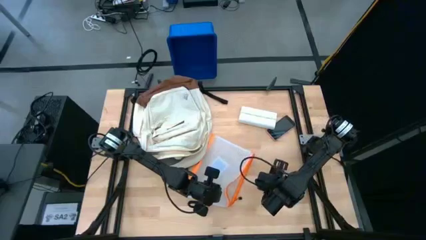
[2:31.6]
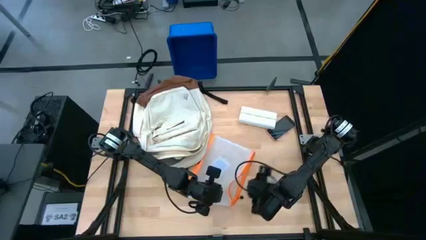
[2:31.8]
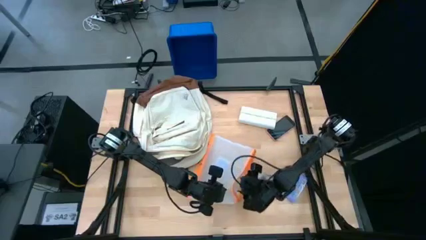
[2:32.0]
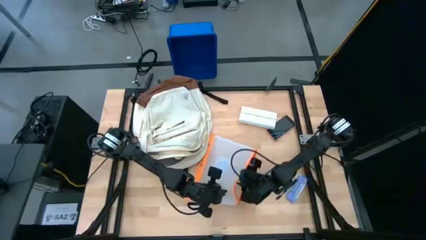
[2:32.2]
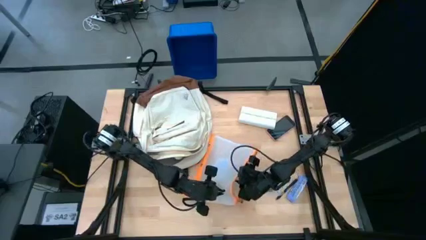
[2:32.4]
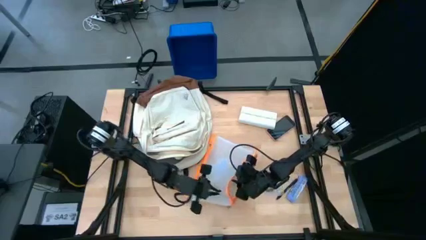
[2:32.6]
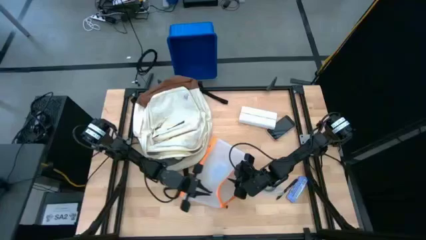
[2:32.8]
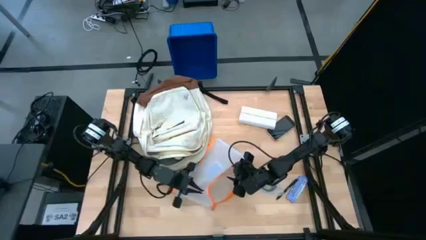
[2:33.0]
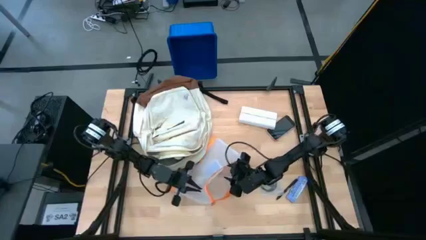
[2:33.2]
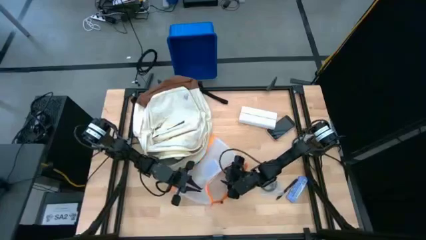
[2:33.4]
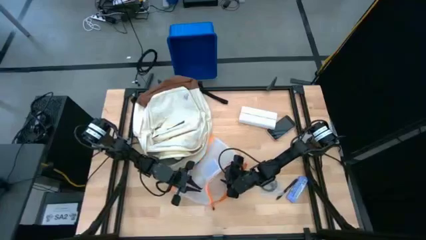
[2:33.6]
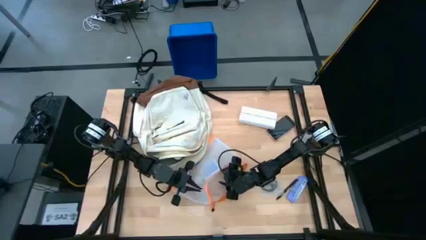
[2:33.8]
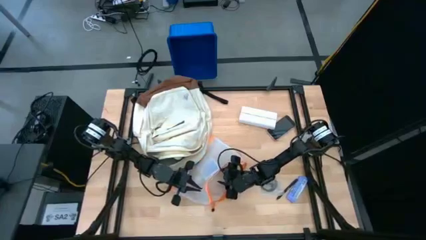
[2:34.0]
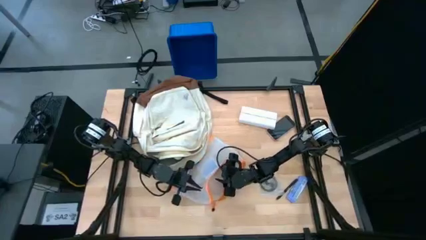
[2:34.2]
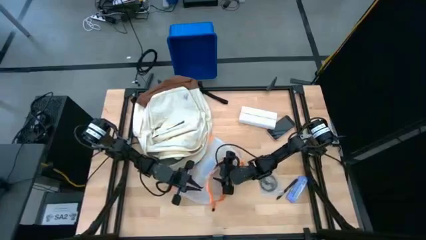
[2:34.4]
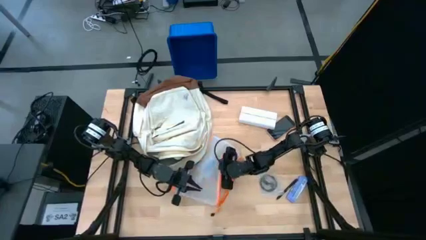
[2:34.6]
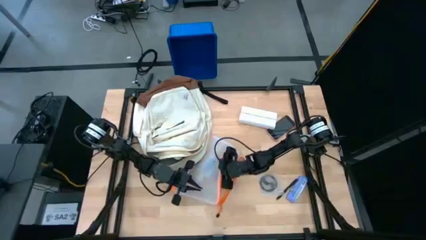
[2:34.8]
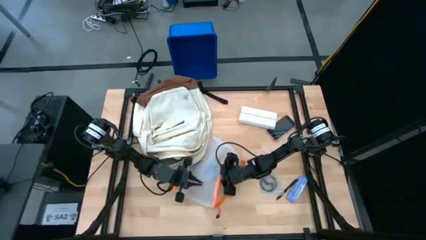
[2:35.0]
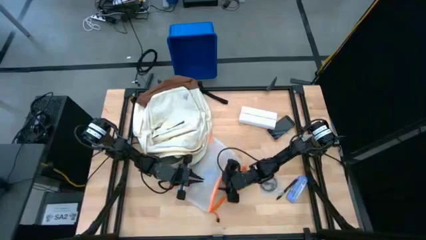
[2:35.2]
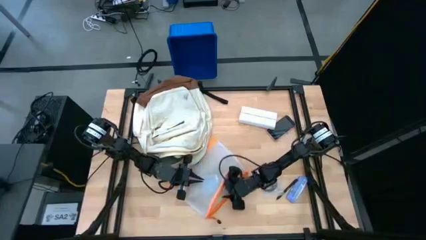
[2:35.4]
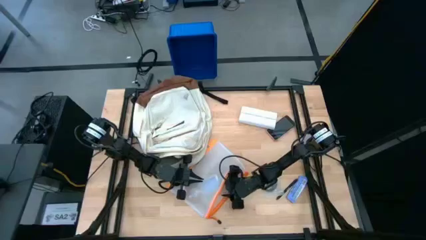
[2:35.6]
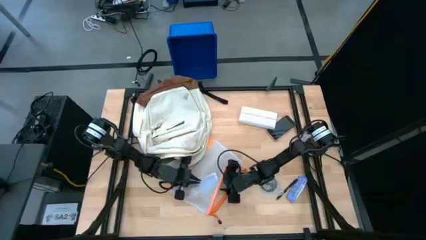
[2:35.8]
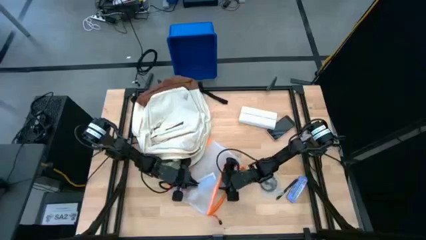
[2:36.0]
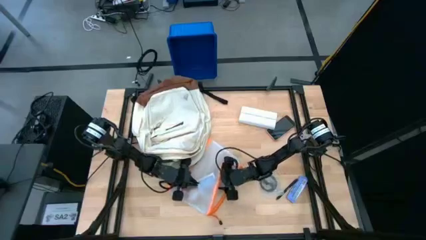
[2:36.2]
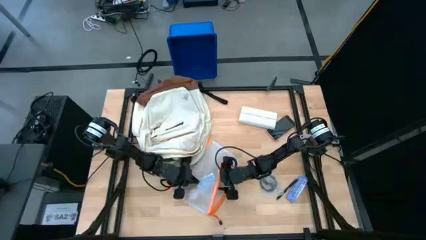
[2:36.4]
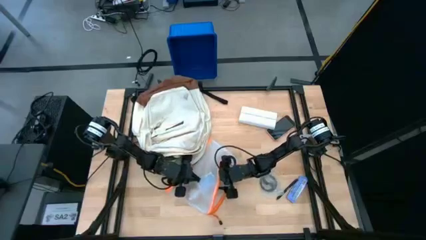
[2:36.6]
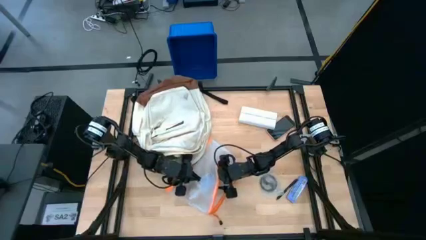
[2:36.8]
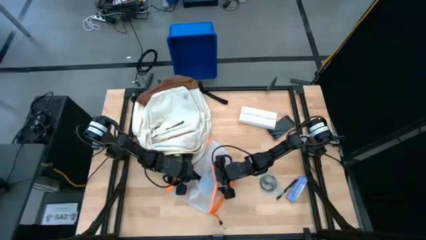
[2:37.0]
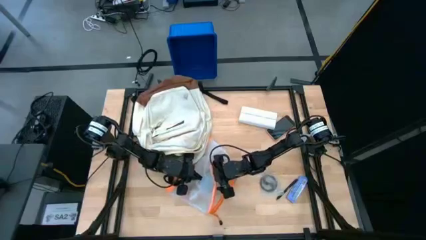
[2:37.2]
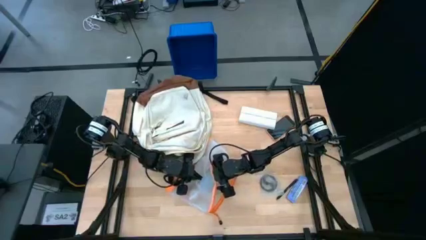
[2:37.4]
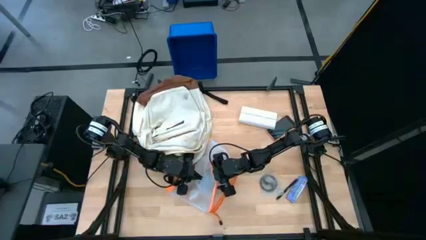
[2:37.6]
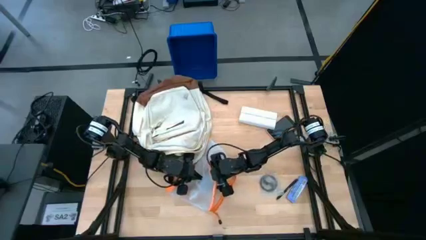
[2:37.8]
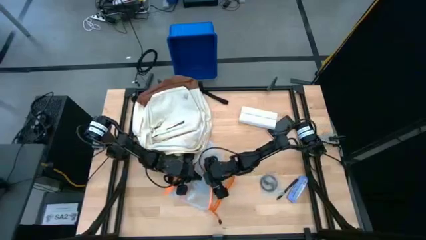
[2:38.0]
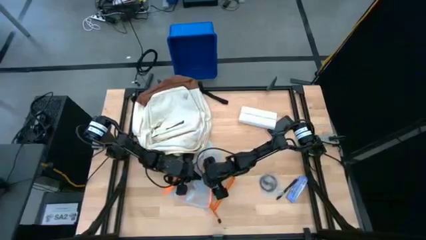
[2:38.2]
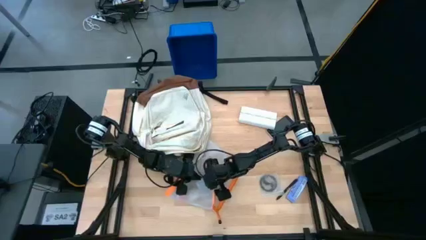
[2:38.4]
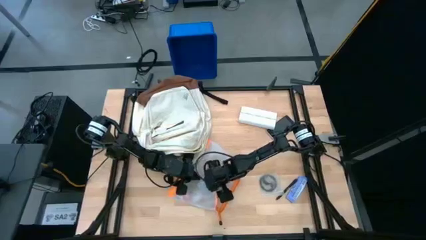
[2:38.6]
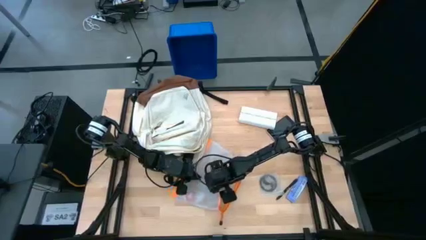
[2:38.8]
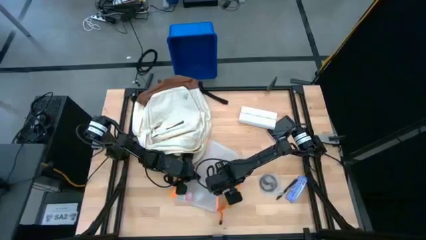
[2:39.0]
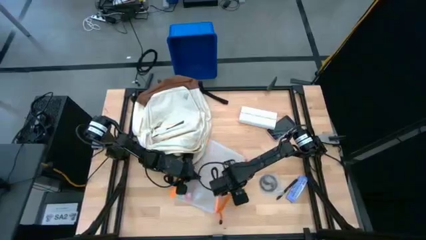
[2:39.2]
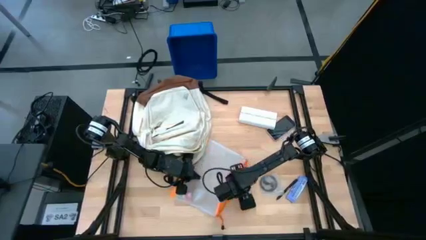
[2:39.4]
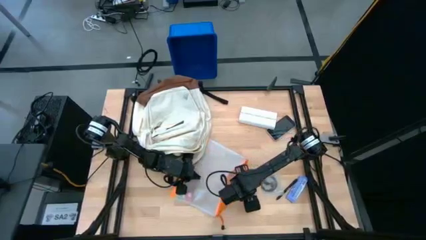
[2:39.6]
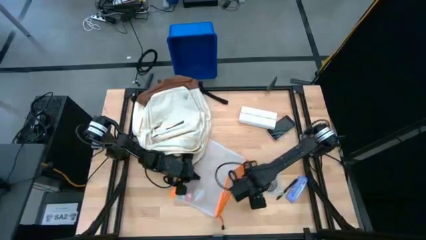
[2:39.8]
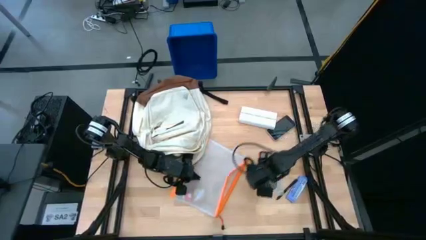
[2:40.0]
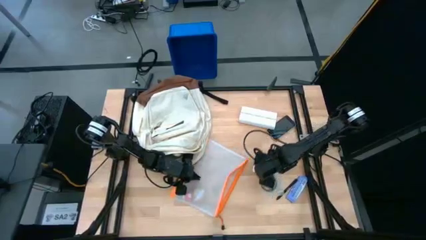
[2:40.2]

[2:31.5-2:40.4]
Task: Unpack backpack
Remove the playing card box from the zip bag

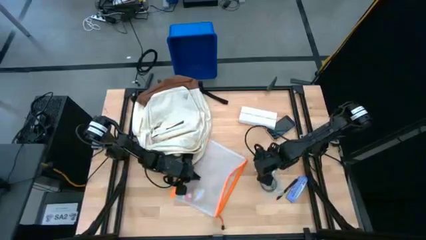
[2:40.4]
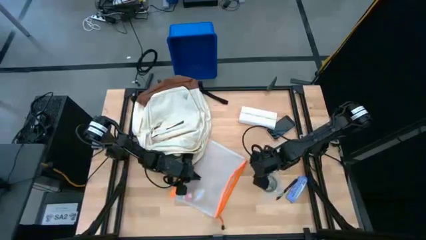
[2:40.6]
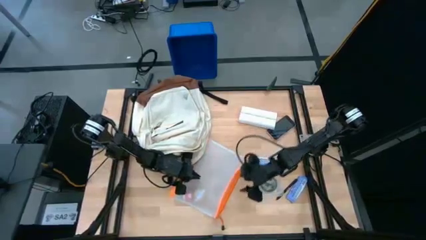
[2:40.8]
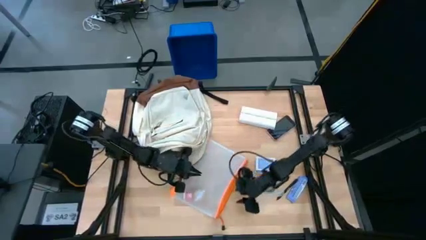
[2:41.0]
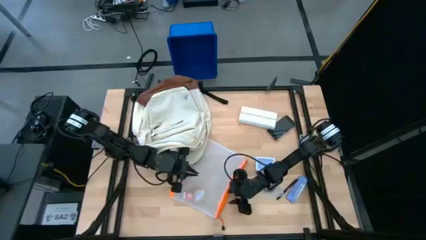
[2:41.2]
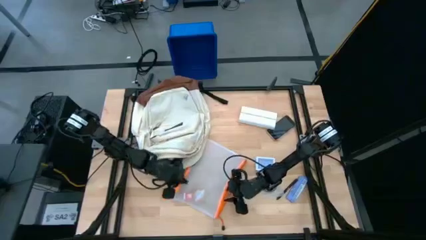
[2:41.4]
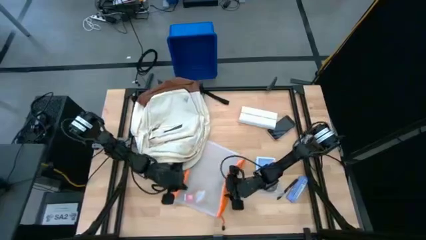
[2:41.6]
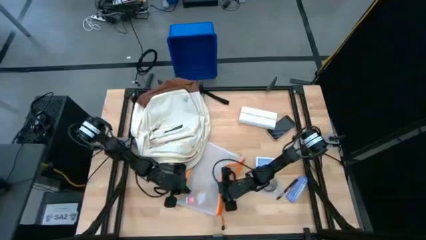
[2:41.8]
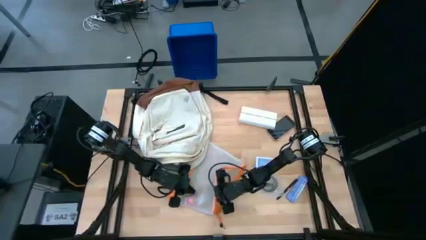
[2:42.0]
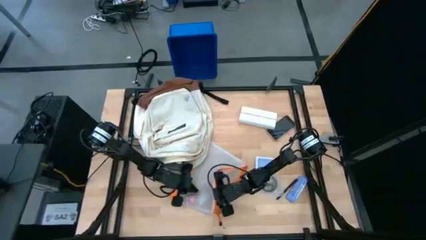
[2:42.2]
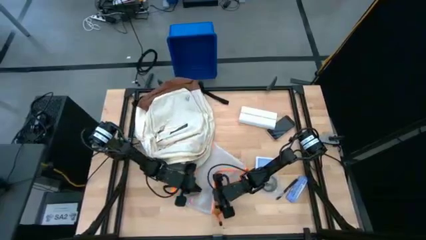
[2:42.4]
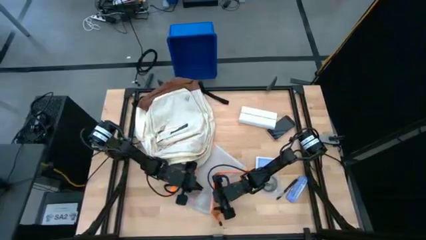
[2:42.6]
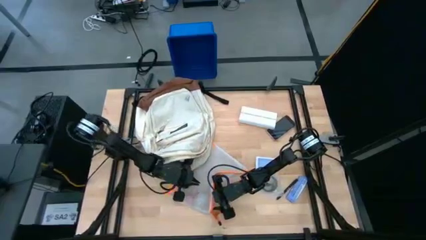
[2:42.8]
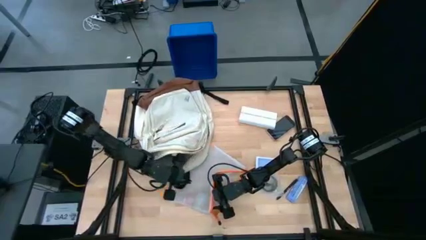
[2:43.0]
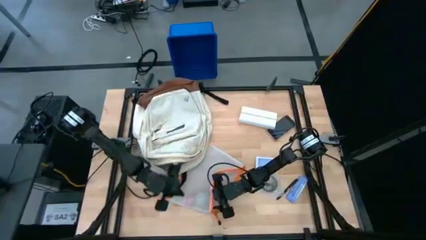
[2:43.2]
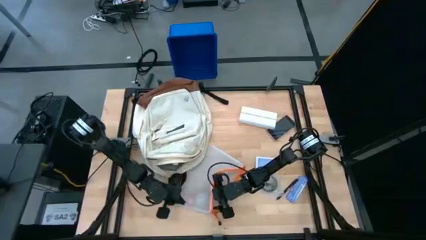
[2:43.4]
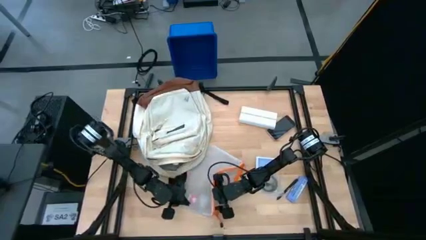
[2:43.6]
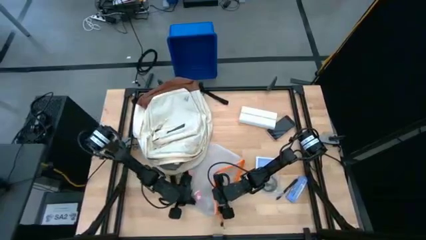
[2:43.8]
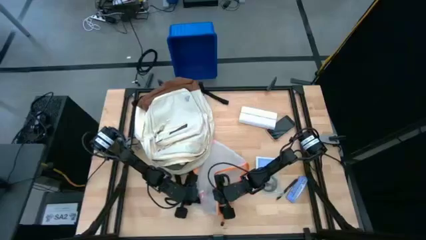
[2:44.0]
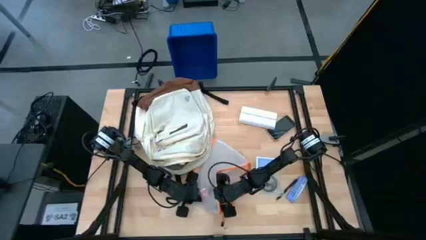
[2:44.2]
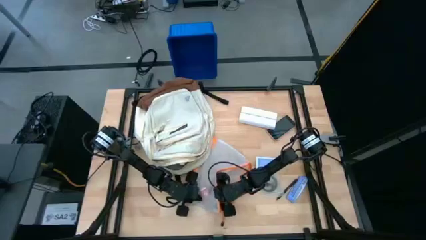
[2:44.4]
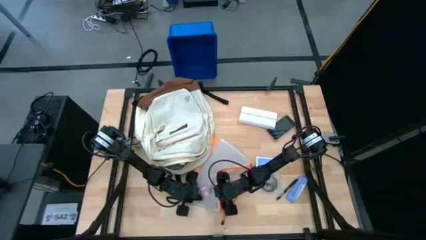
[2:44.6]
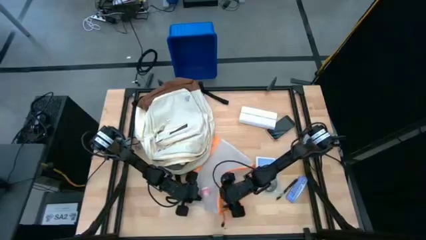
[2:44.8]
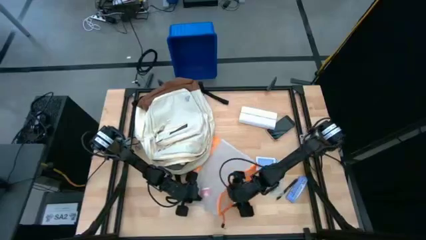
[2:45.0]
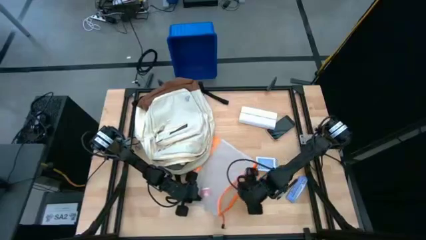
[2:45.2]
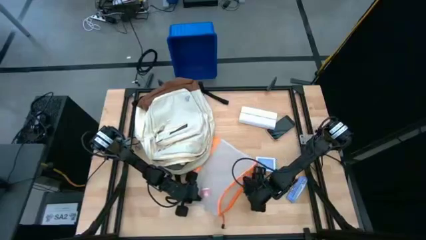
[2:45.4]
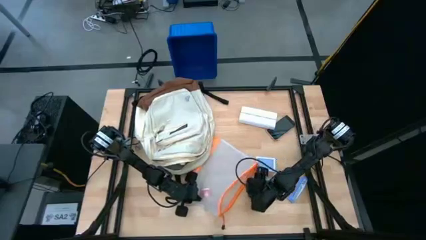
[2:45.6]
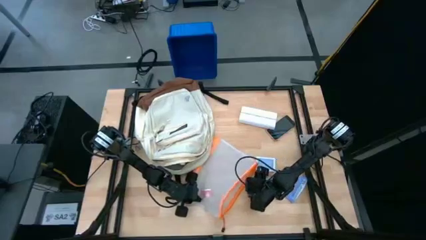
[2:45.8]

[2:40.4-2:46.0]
Remove the yellow scented candle from the zip bag
